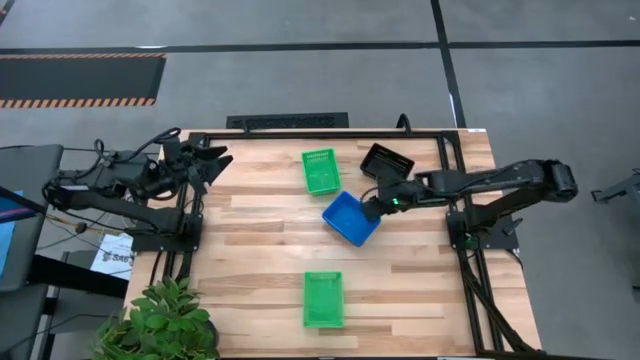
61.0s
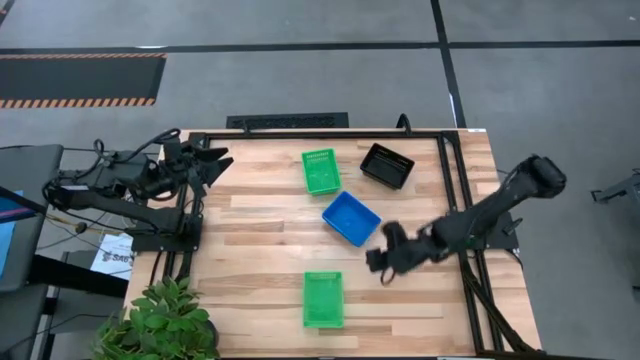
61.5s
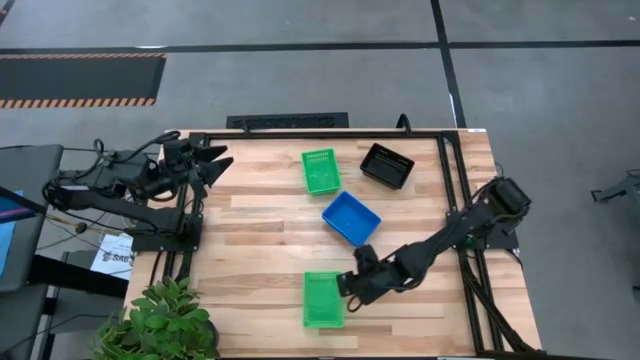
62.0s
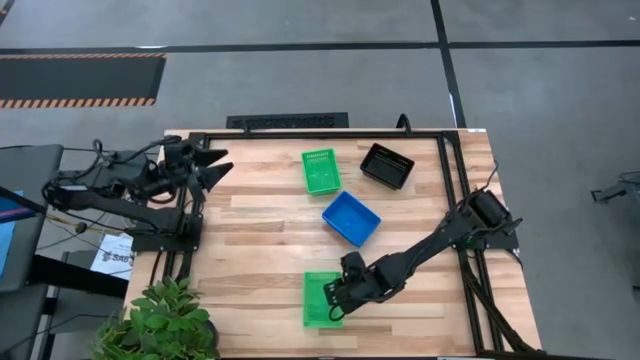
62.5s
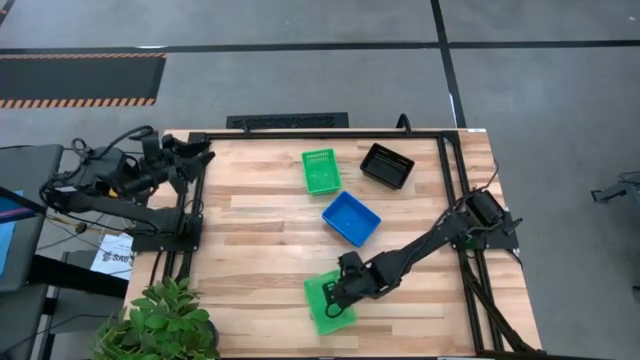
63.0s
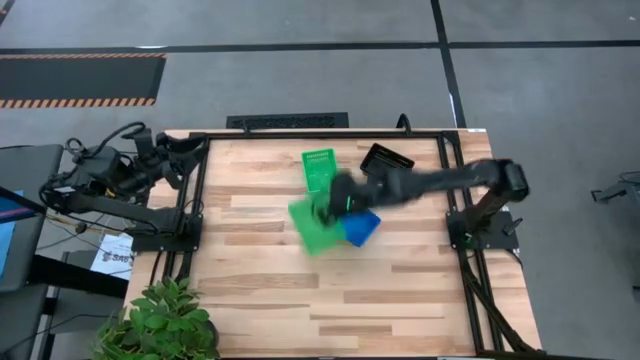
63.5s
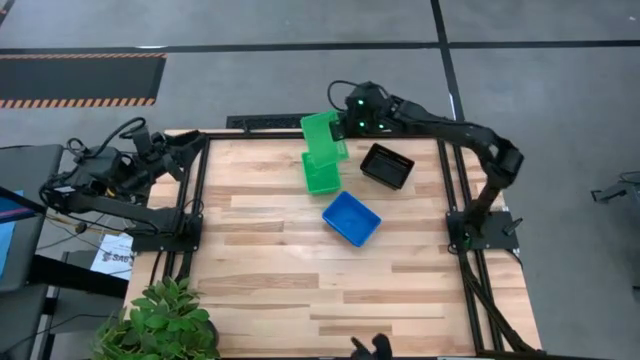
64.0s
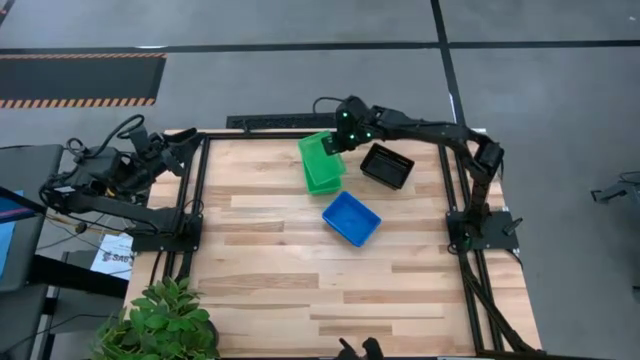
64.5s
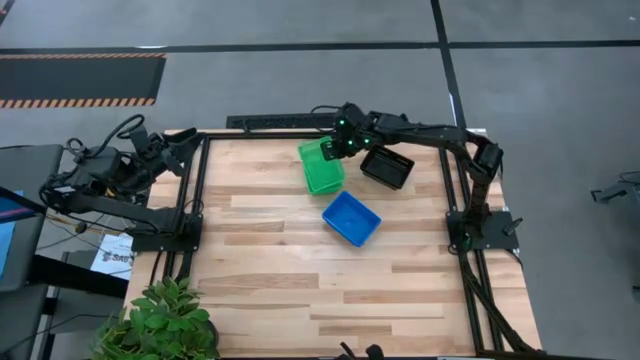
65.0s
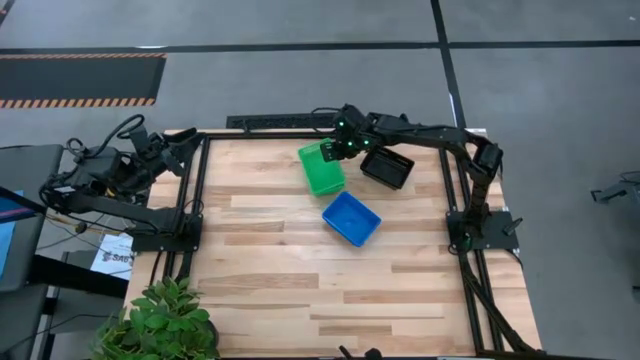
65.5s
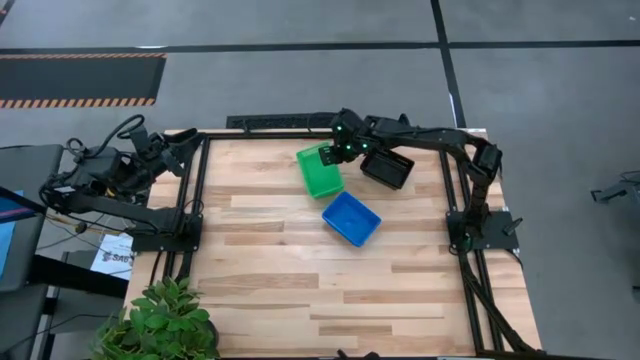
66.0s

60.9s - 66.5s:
Stack the bottom green bin on the top stacked green bins

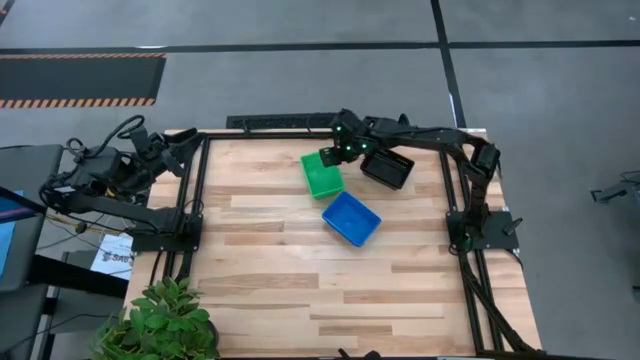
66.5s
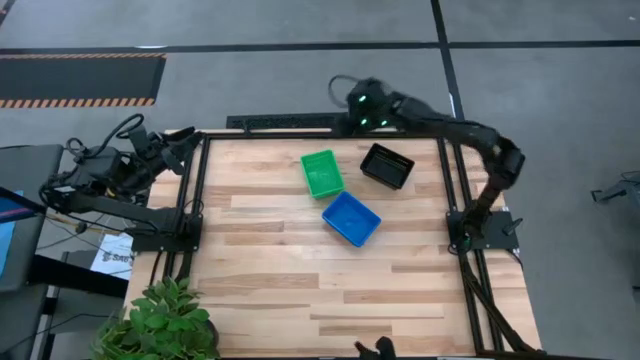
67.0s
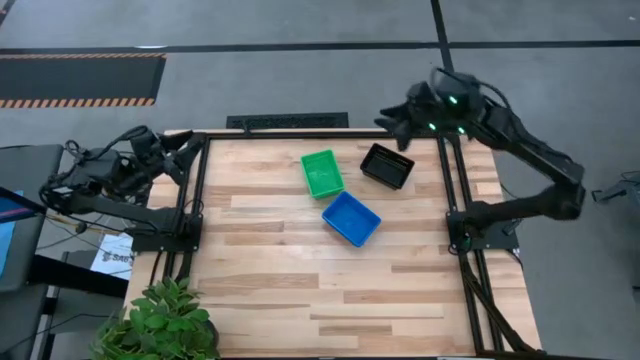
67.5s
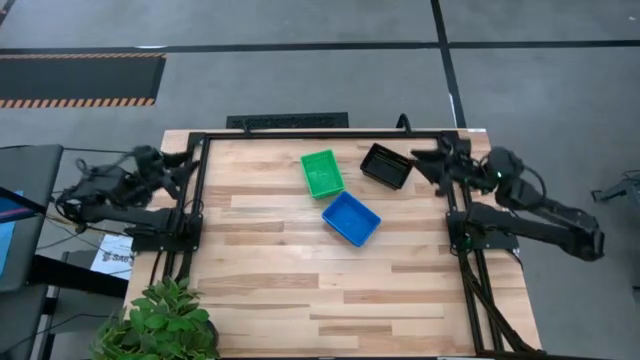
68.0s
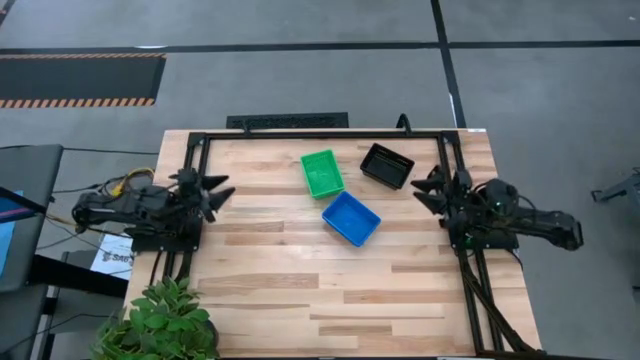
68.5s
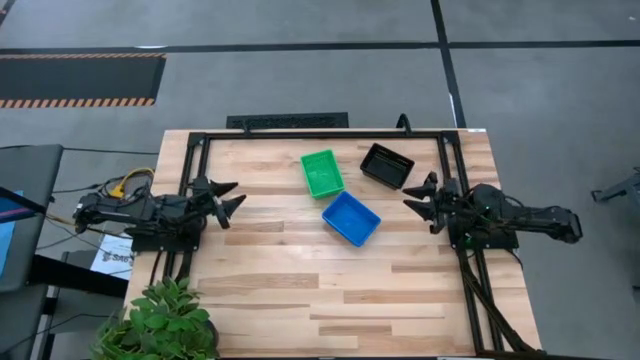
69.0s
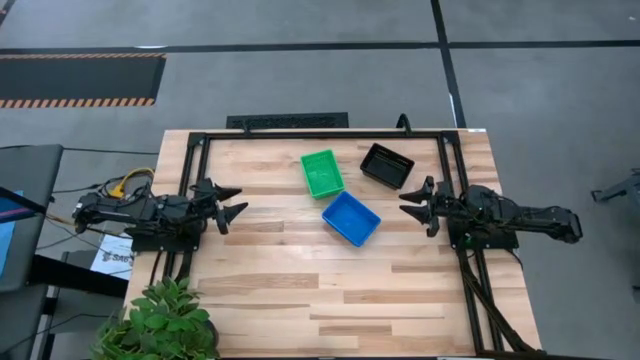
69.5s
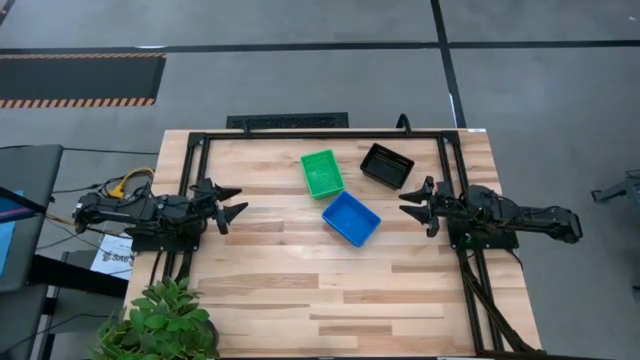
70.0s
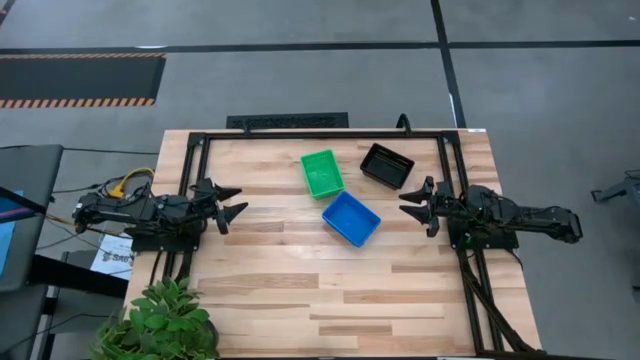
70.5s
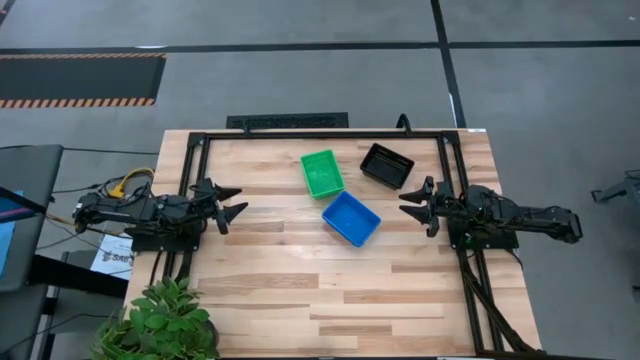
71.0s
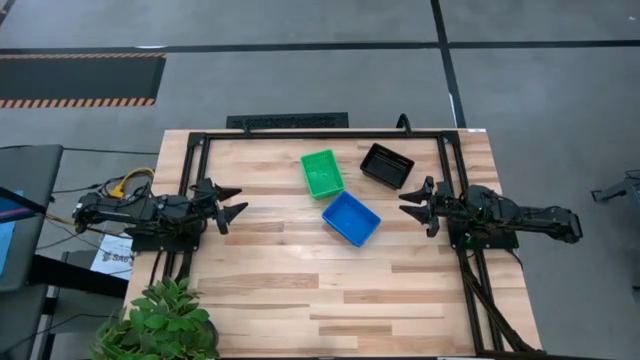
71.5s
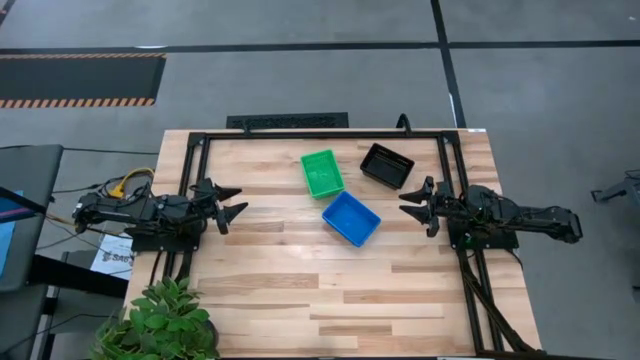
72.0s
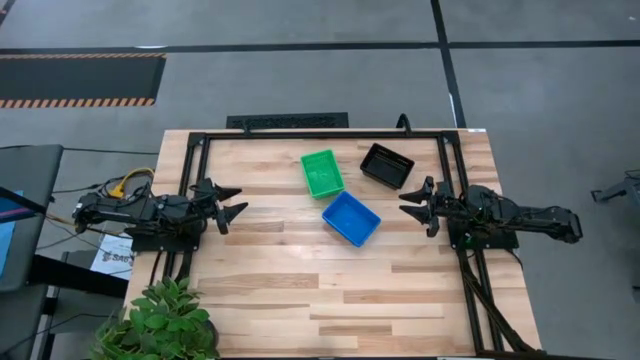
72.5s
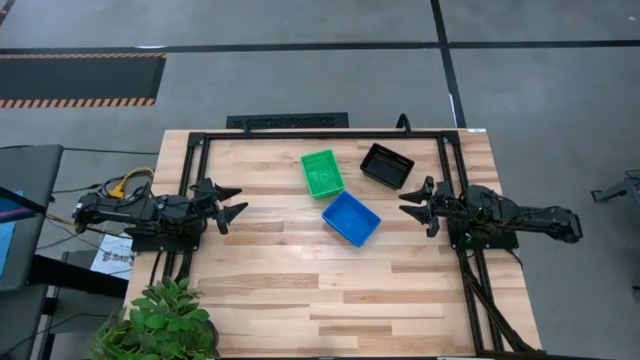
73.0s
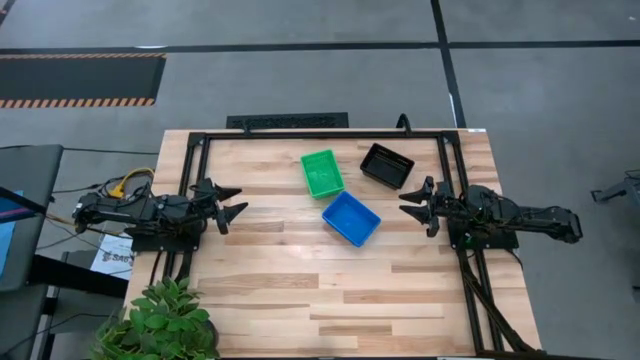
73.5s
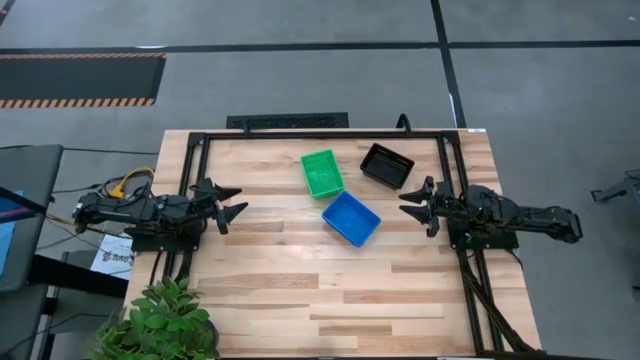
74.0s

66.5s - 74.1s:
Return to Home Position

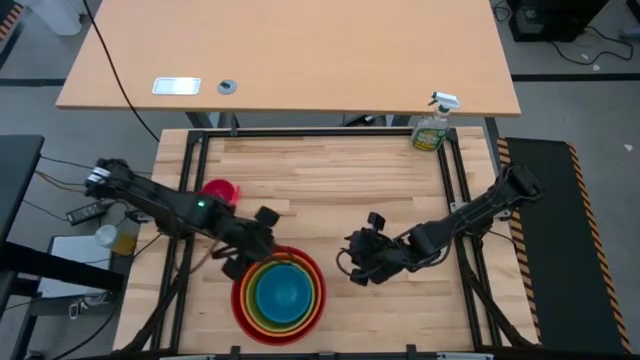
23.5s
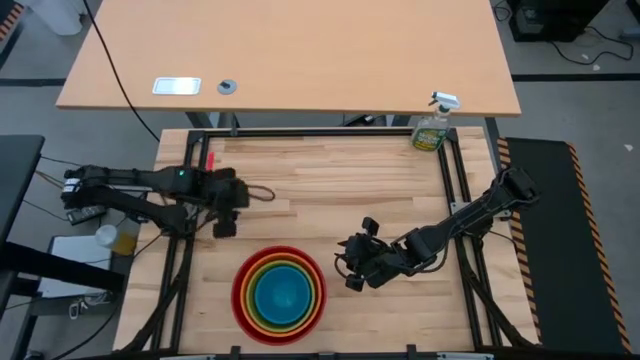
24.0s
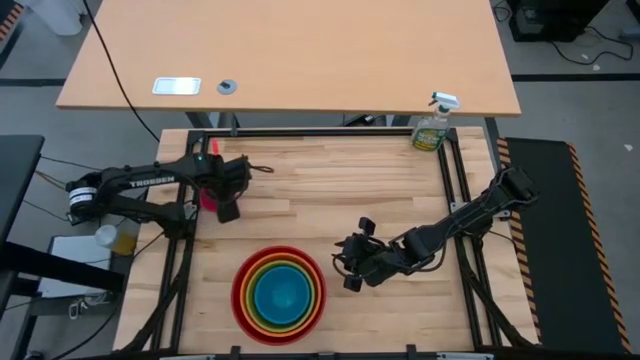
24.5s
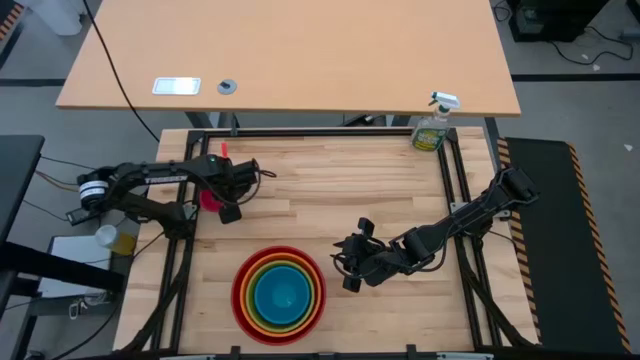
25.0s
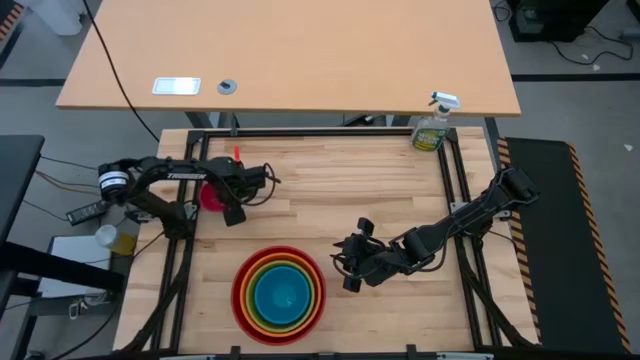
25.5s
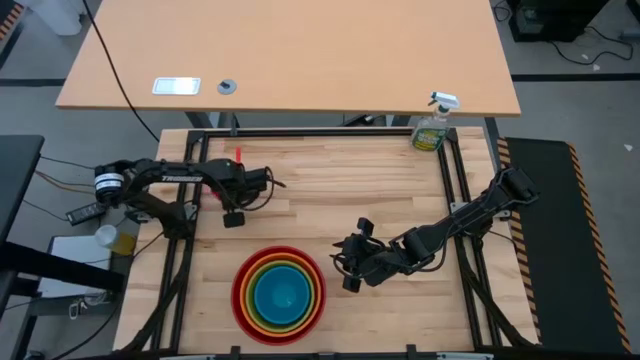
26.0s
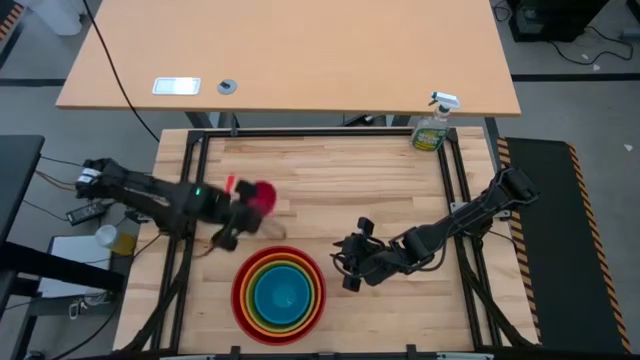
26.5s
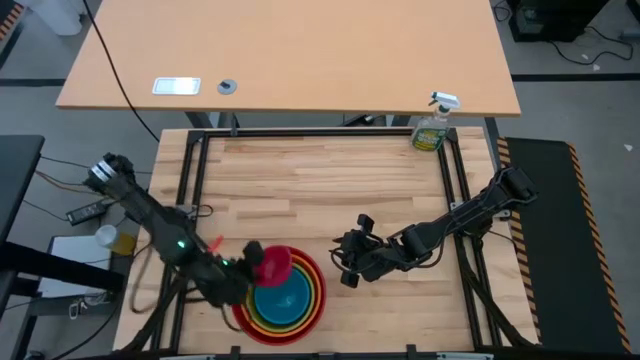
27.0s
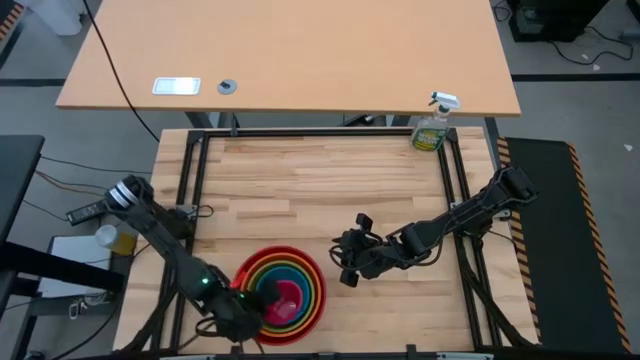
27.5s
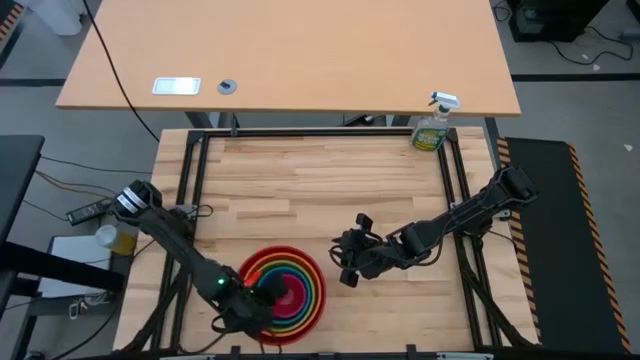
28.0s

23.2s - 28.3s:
Stack the pink bowl on top of the blue bowl
